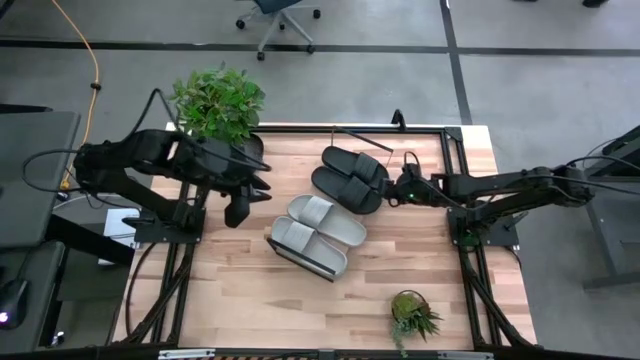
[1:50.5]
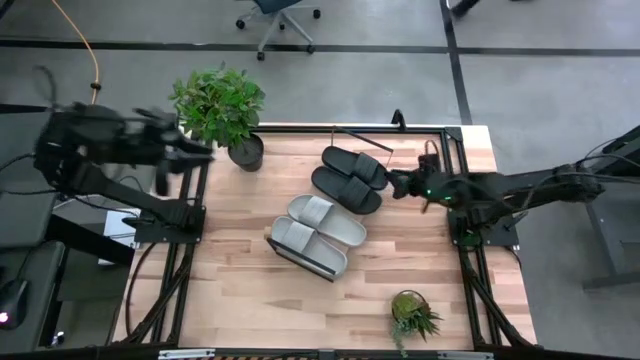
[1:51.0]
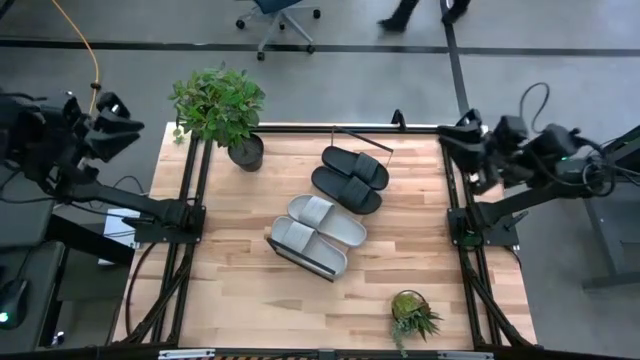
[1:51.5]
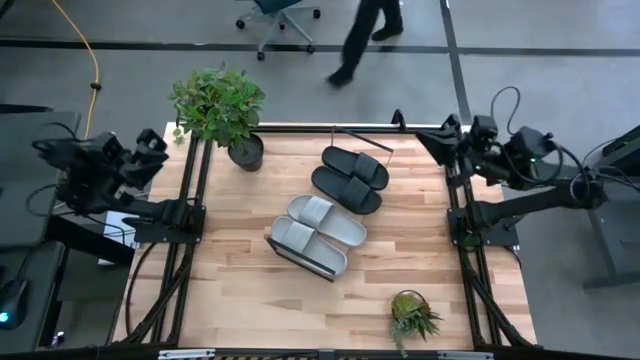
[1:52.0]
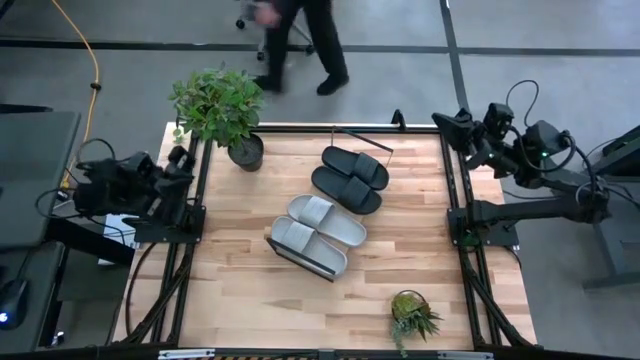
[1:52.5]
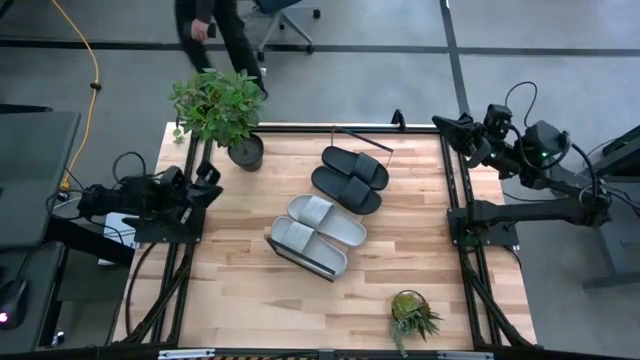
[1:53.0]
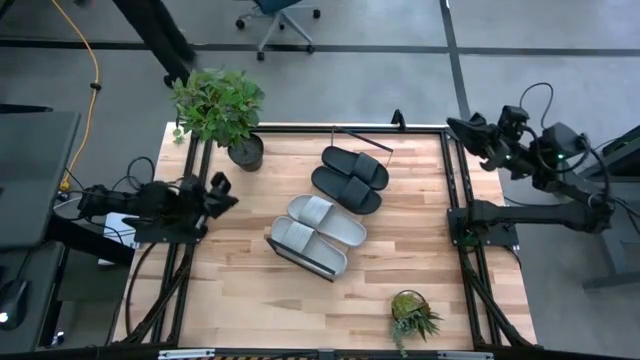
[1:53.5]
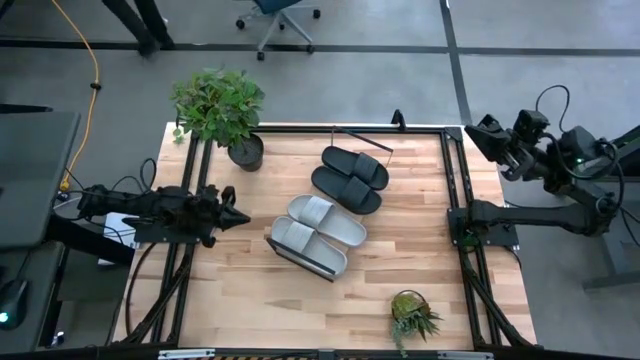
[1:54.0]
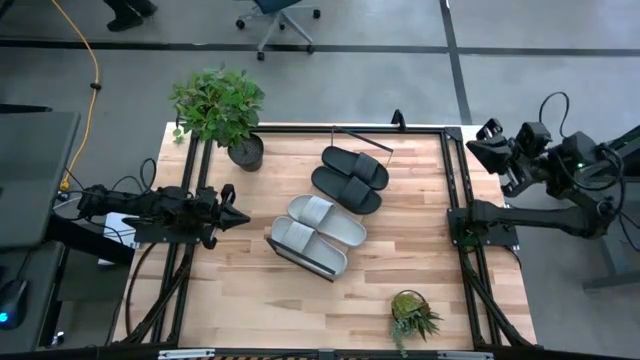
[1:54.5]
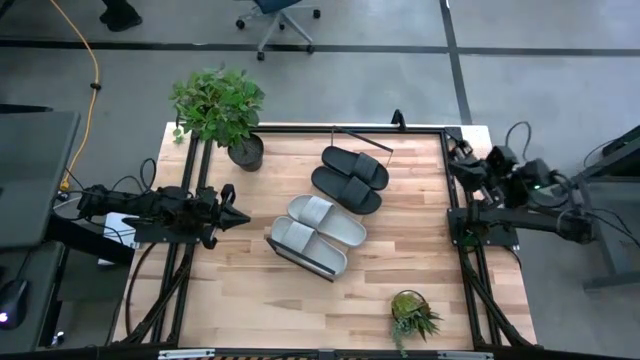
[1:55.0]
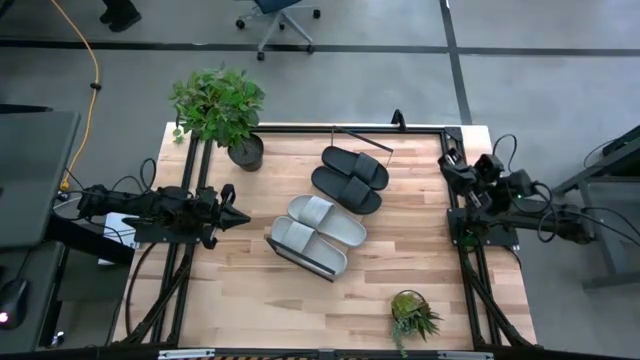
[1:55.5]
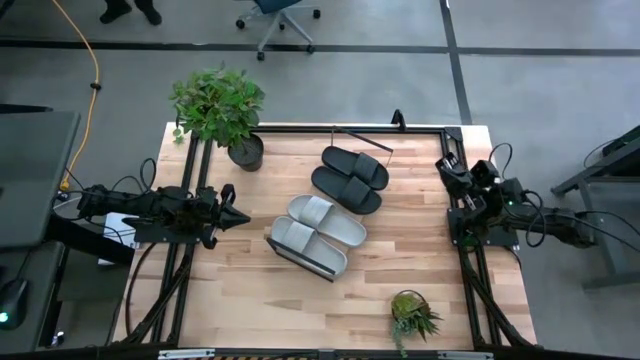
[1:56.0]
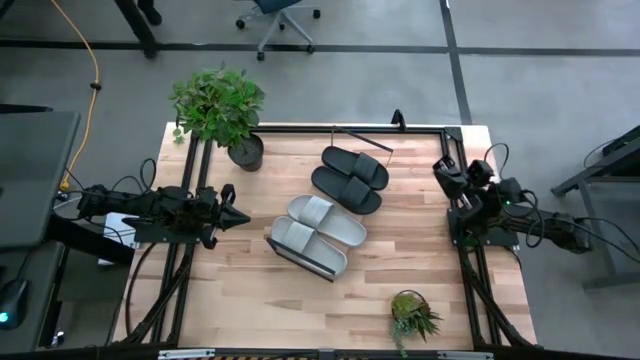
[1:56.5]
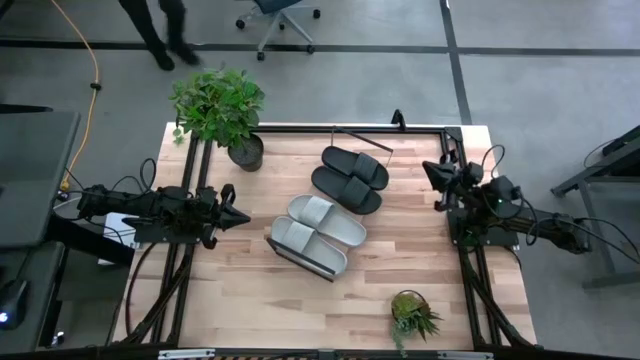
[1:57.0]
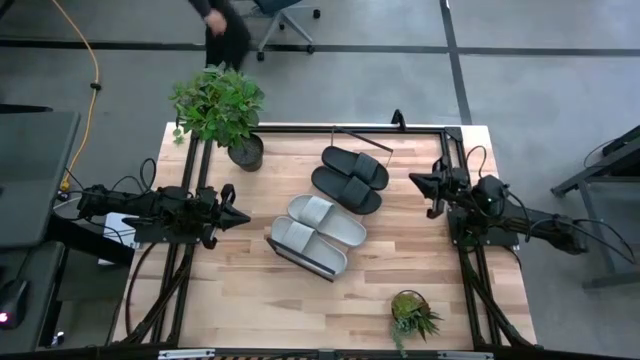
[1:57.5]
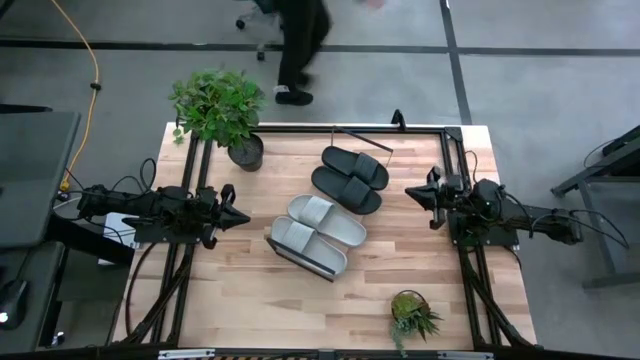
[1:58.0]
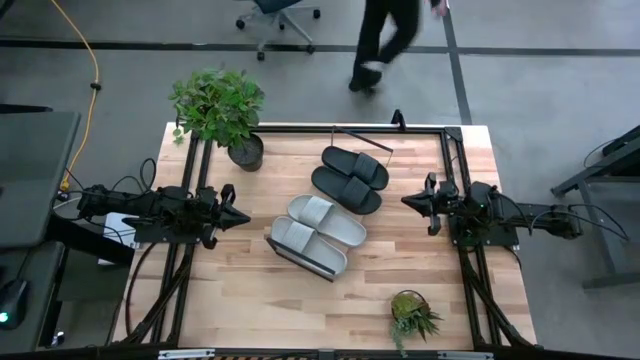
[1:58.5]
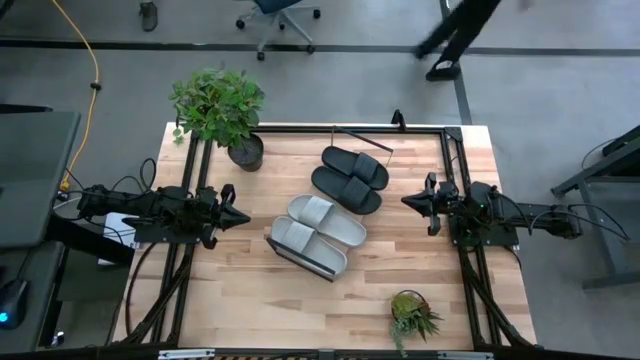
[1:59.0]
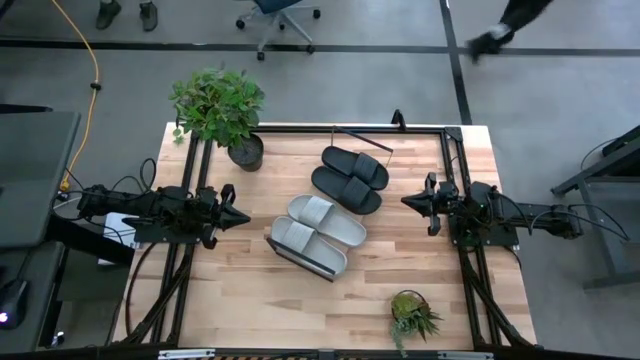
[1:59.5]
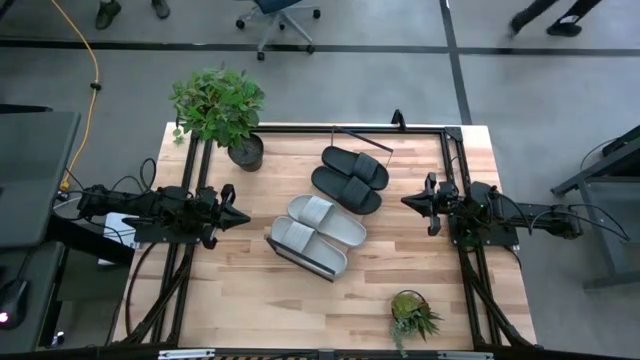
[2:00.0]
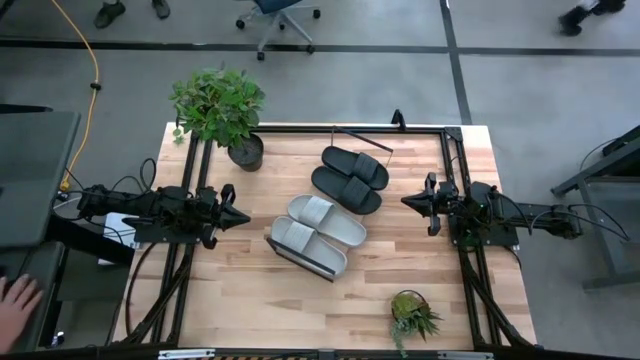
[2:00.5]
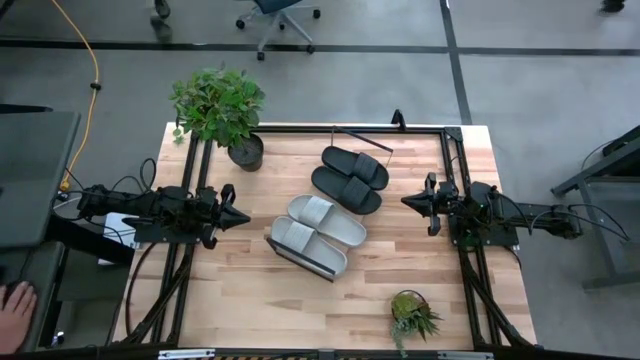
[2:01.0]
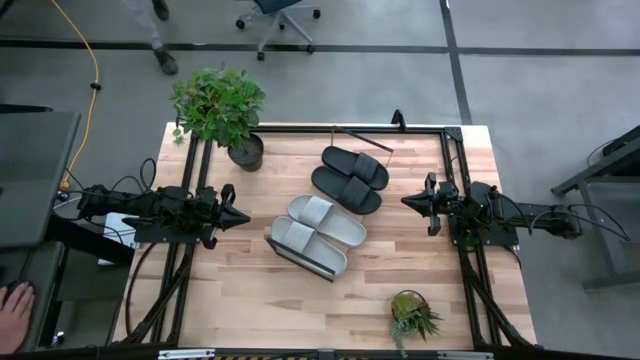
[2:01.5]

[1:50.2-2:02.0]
Task: Pick and place slides into the shelf
Return to Home Position

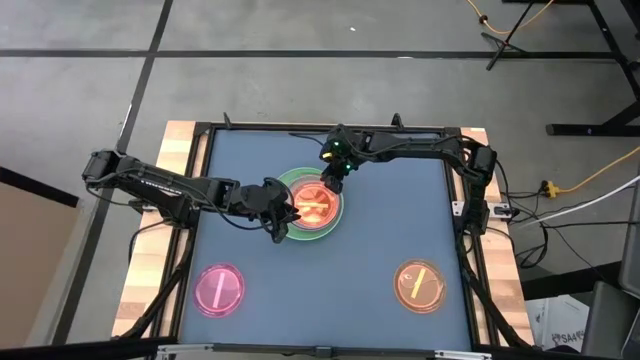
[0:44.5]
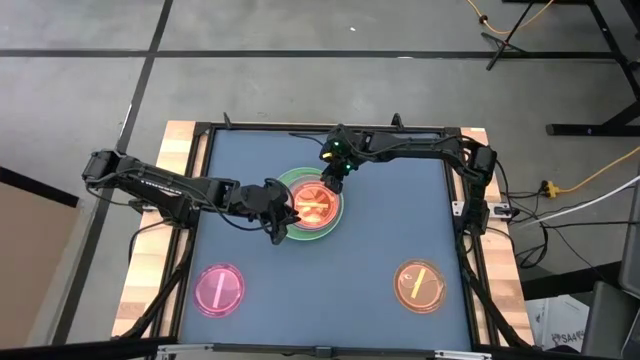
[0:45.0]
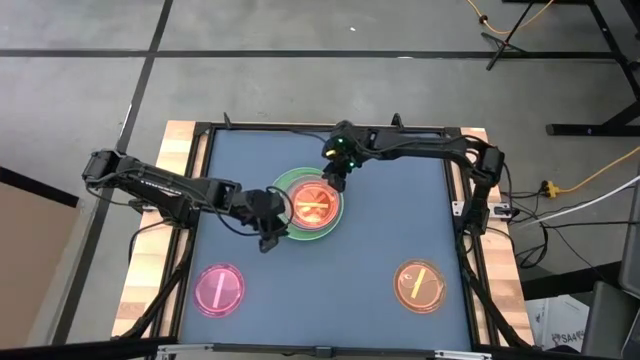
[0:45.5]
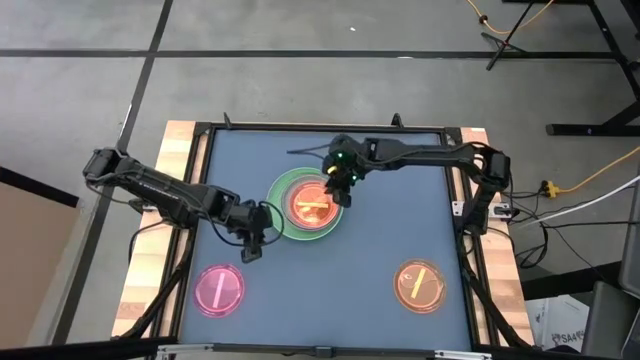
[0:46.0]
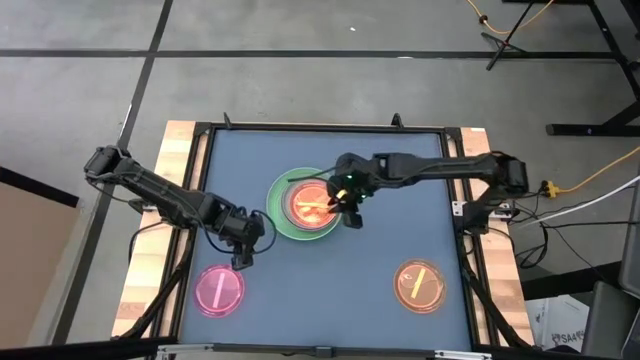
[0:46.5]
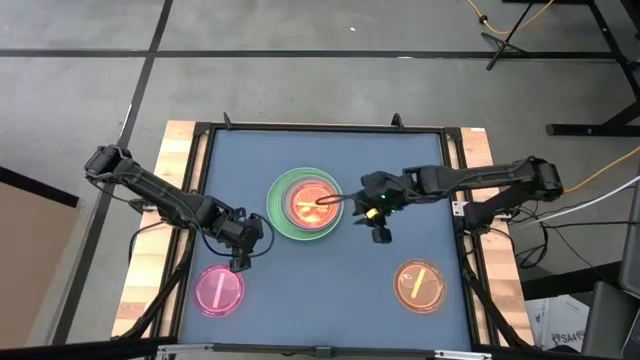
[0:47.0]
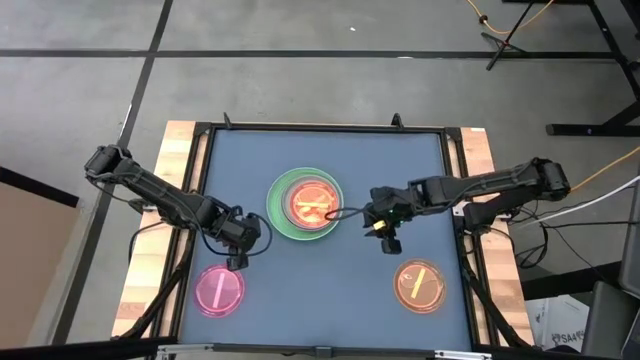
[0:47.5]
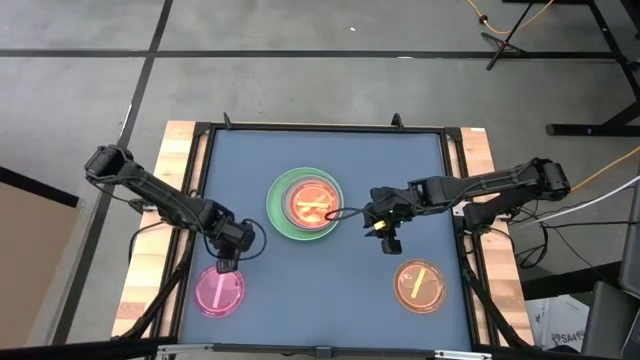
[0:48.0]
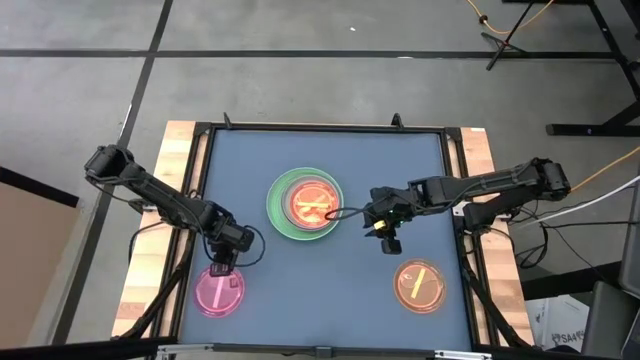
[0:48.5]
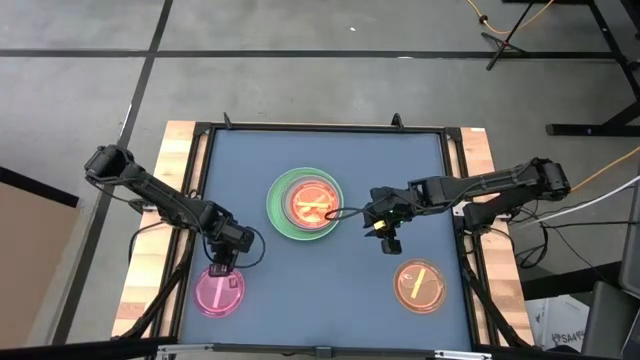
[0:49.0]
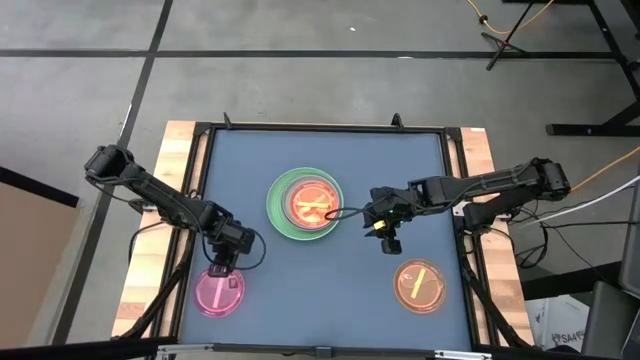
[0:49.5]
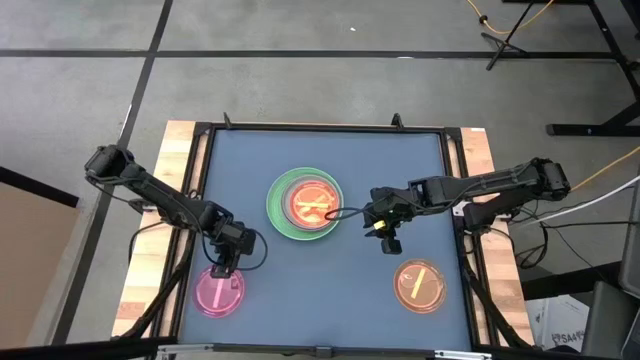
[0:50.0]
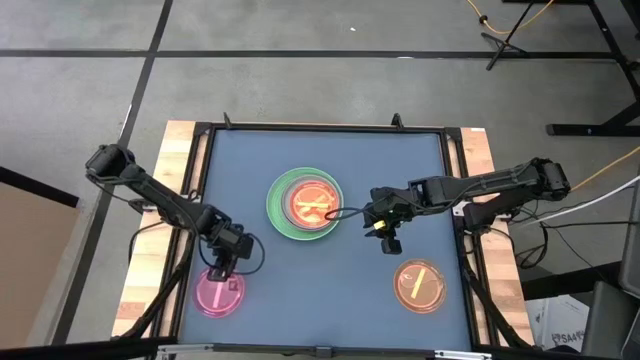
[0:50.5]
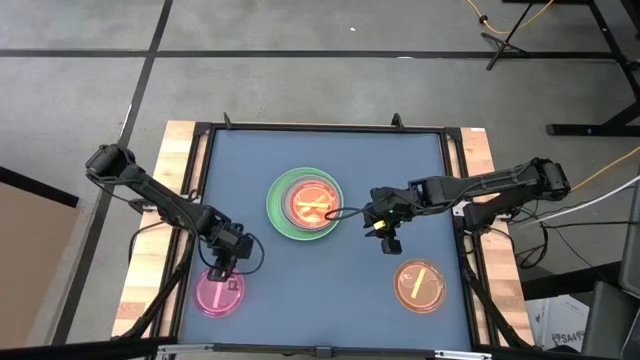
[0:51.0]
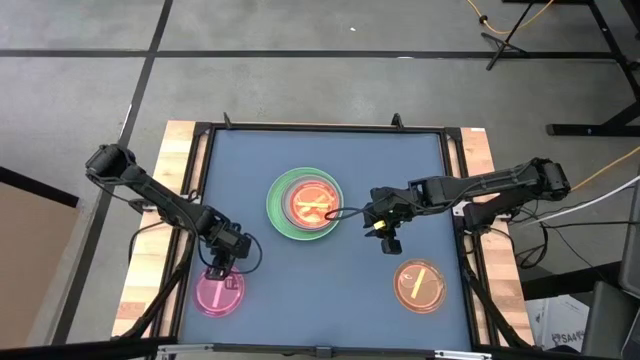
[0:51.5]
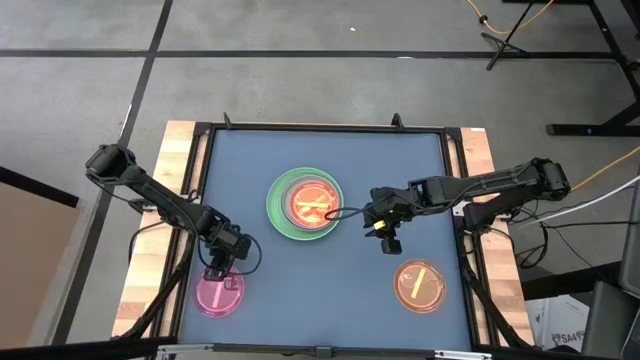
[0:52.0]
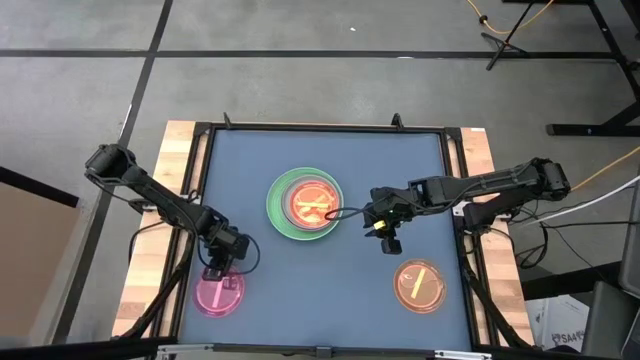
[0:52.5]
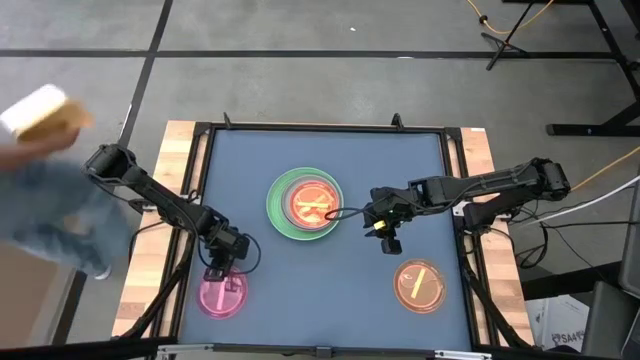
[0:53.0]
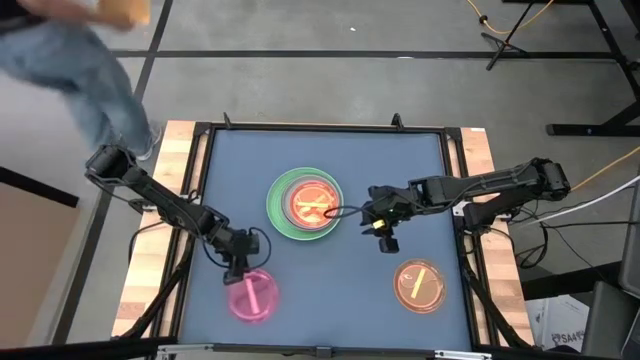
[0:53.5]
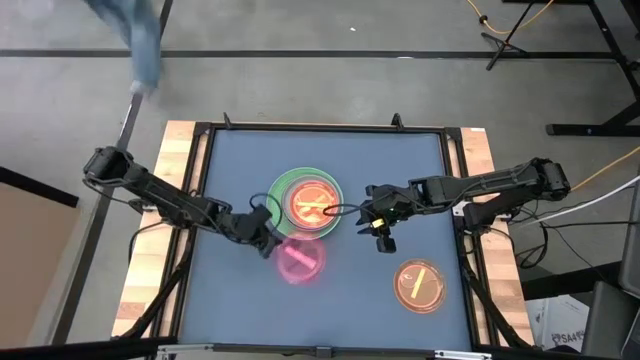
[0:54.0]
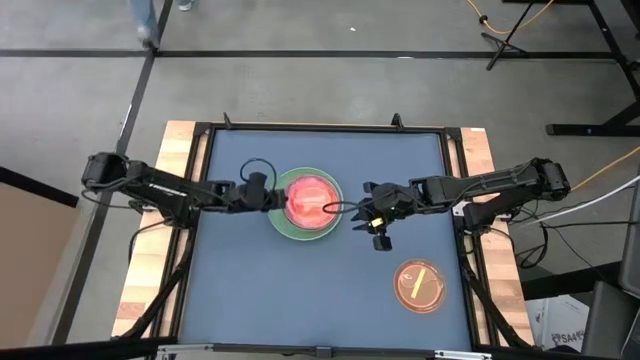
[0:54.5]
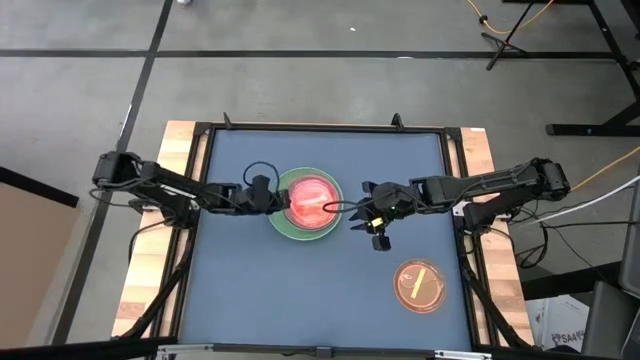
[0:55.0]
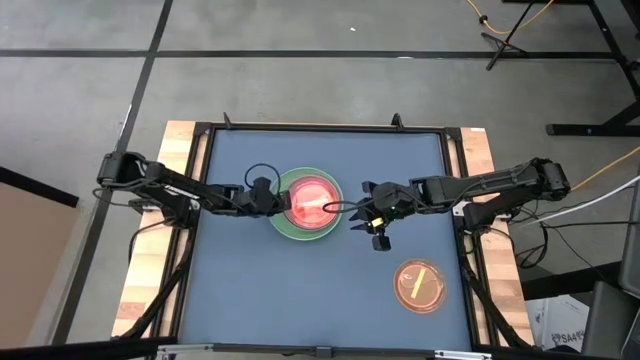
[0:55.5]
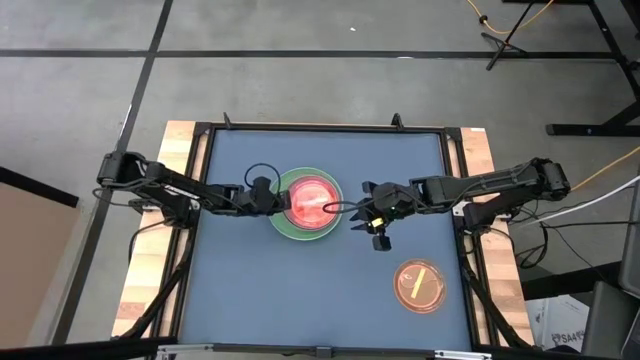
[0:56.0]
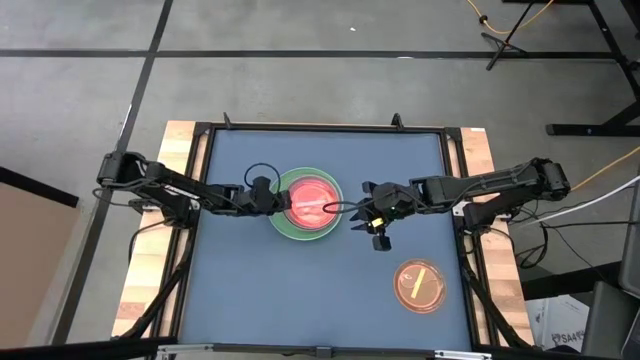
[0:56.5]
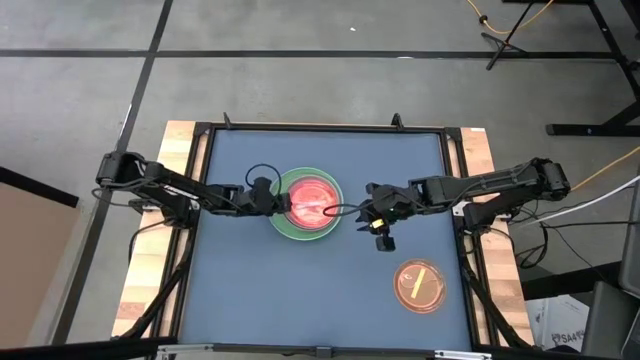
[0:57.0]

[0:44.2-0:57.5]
Task: Stack plastic plates
Stack the transparent pink plate on the top transparent orange plate
